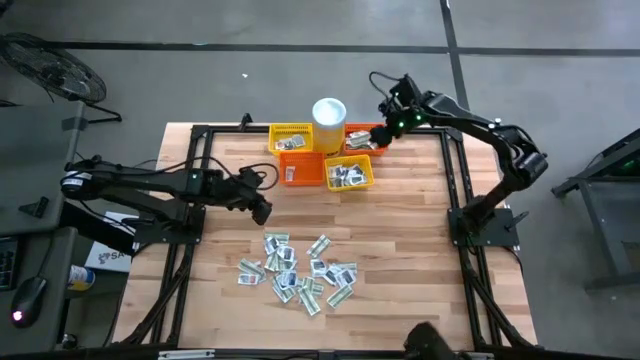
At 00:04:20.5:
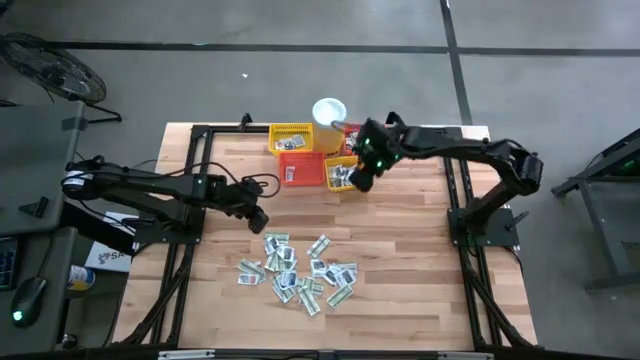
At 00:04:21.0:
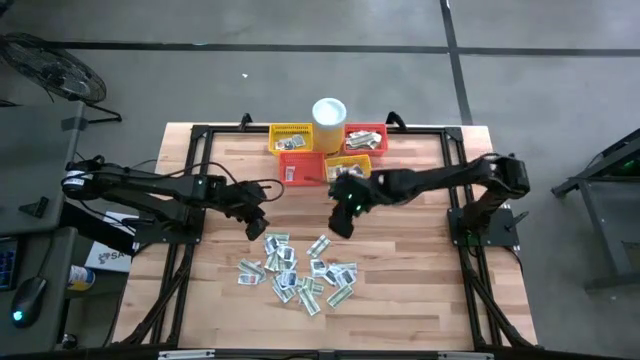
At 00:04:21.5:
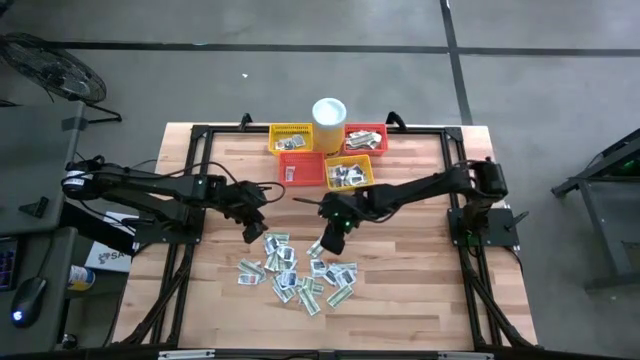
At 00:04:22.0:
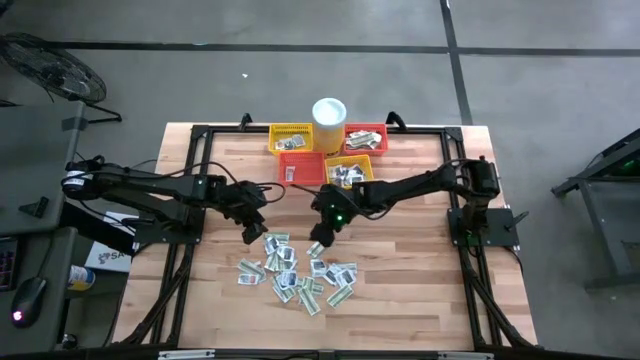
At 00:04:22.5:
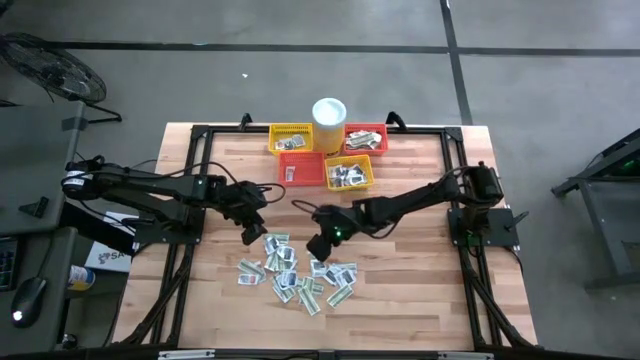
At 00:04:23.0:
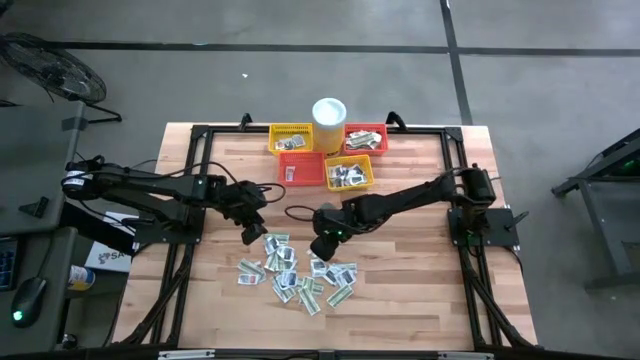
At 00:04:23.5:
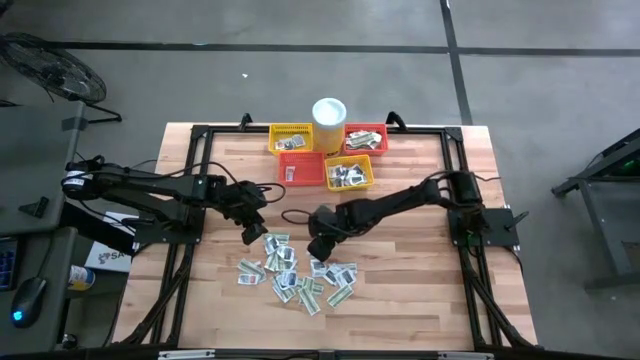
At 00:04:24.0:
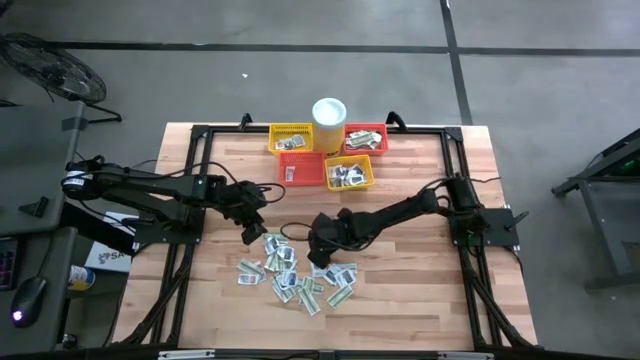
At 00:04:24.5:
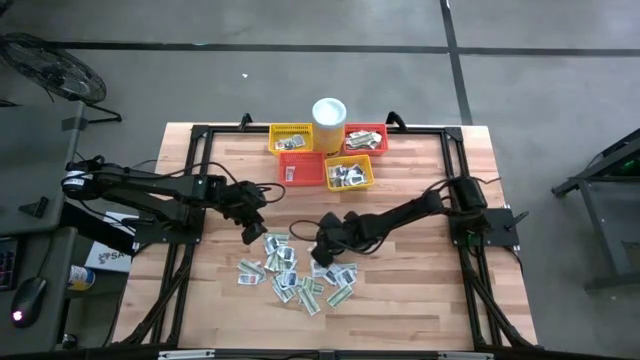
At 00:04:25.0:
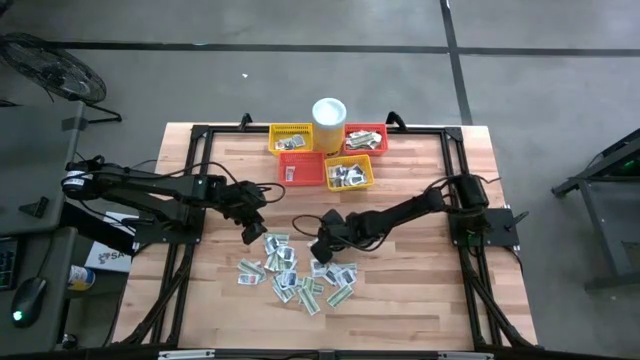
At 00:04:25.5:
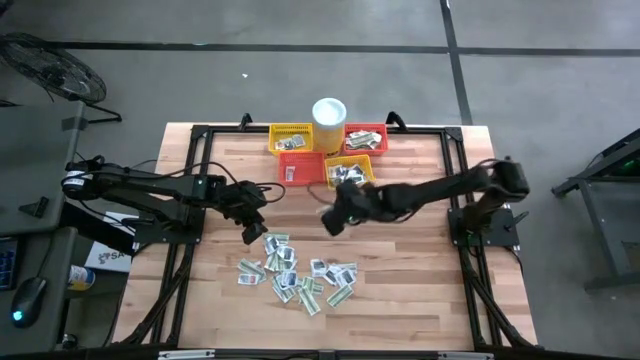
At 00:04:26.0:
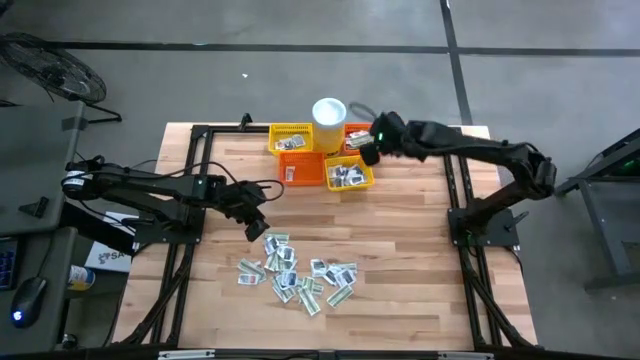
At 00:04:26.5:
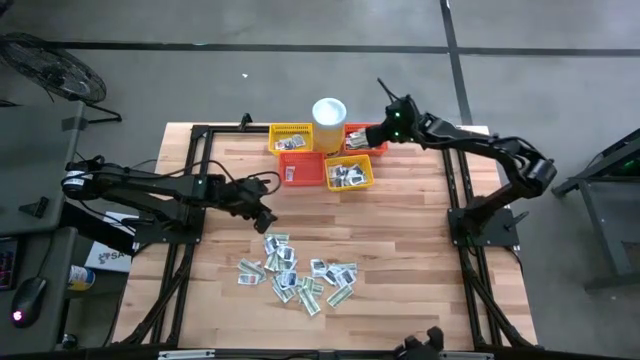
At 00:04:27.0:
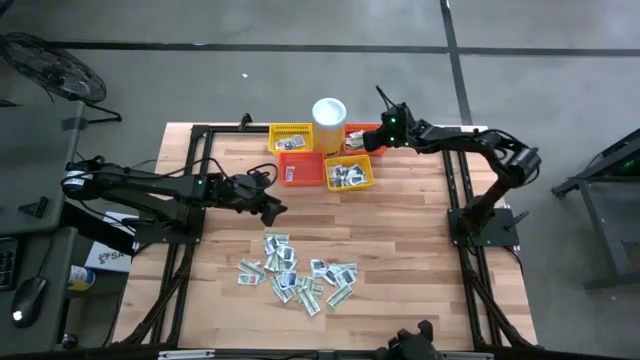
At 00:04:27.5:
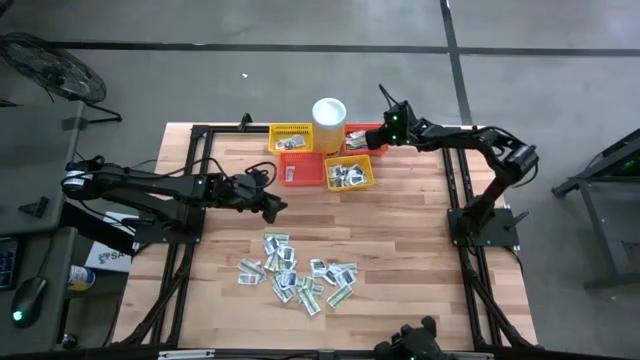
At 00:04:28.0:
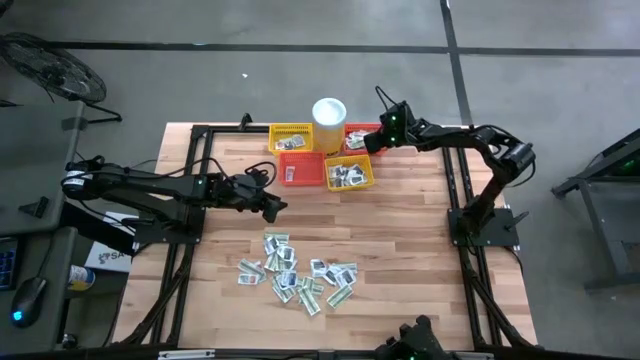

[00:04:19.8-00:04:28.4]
Task: Pick & Place First Aid Supplies
Put the green bandage pack into the top orange basket

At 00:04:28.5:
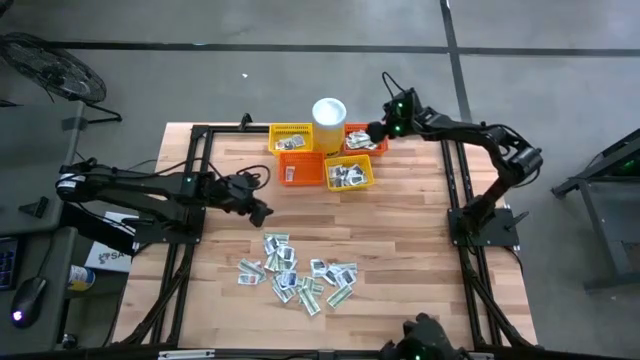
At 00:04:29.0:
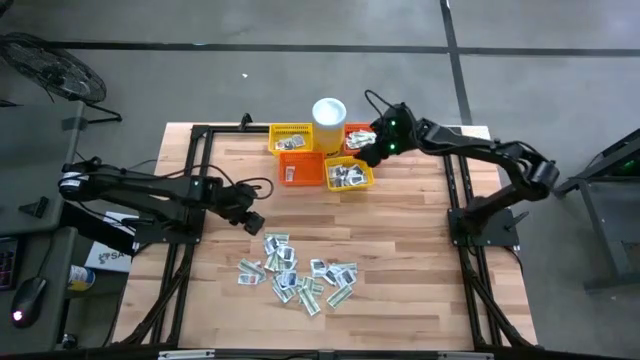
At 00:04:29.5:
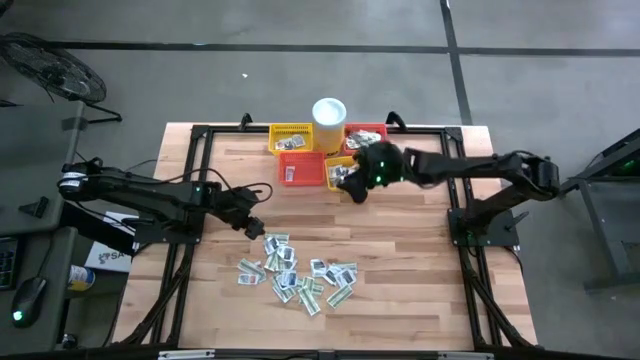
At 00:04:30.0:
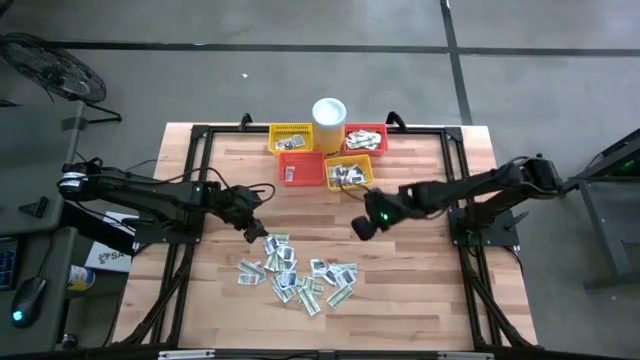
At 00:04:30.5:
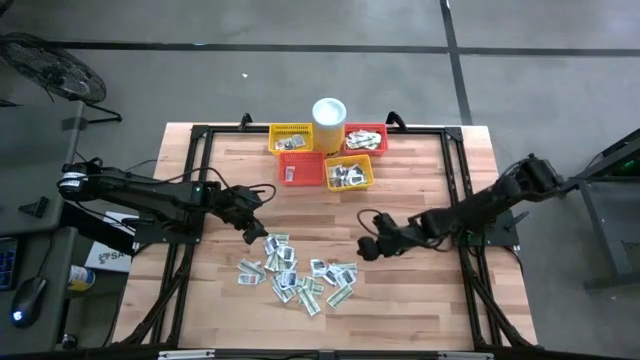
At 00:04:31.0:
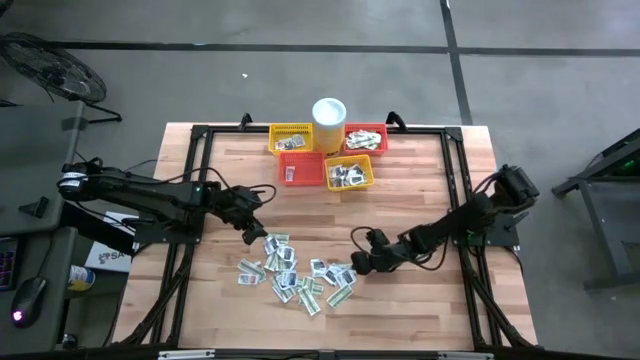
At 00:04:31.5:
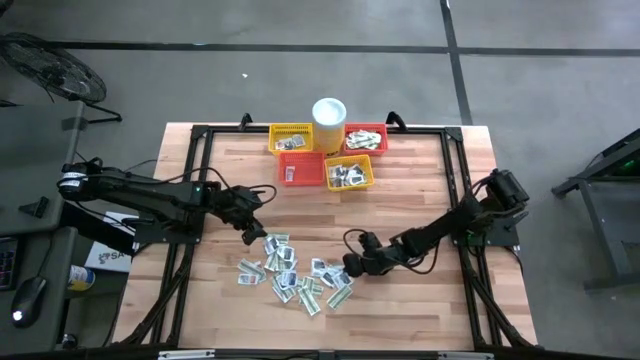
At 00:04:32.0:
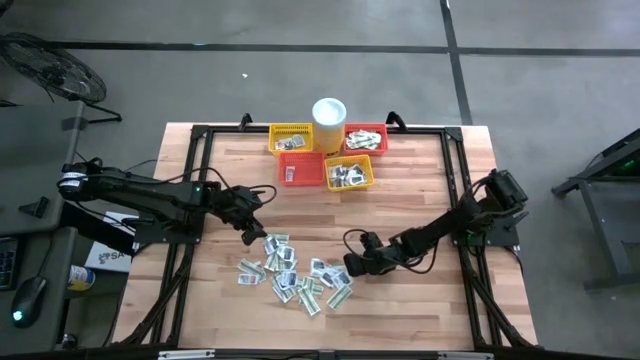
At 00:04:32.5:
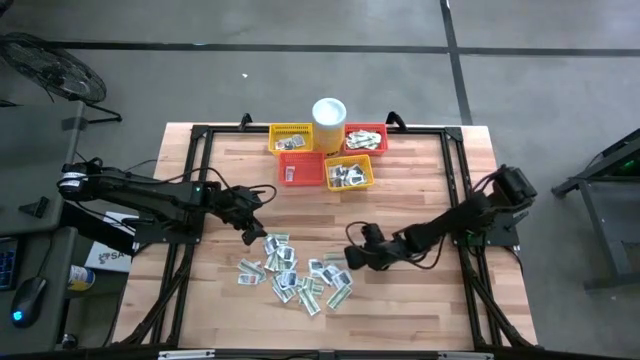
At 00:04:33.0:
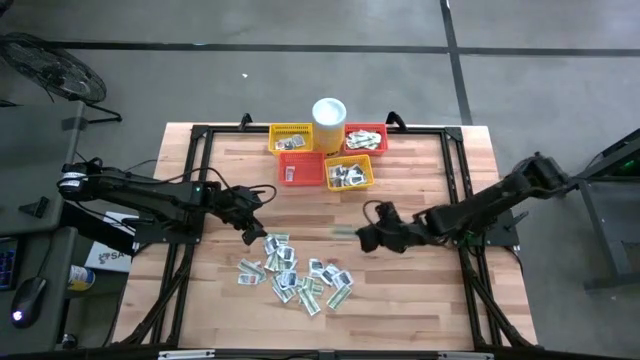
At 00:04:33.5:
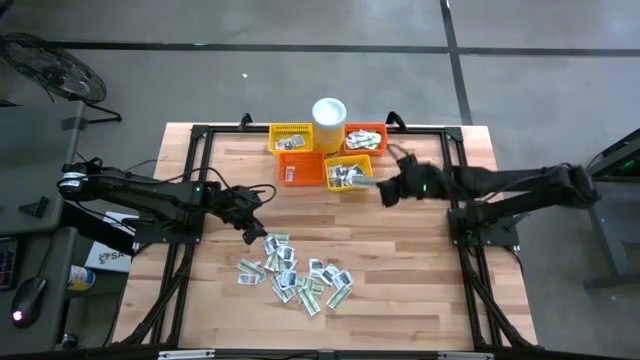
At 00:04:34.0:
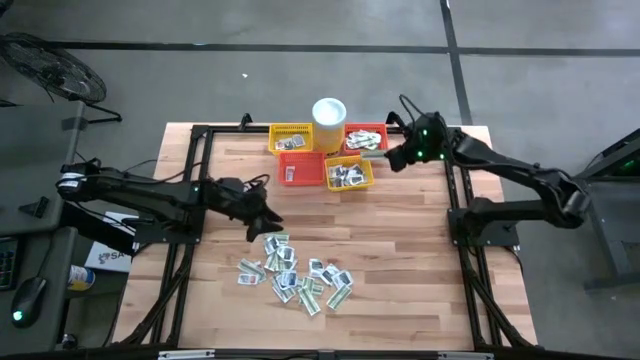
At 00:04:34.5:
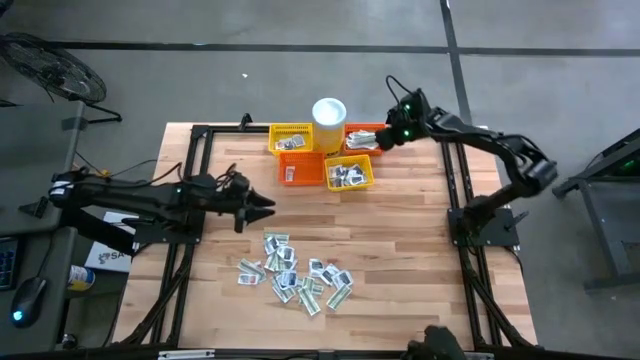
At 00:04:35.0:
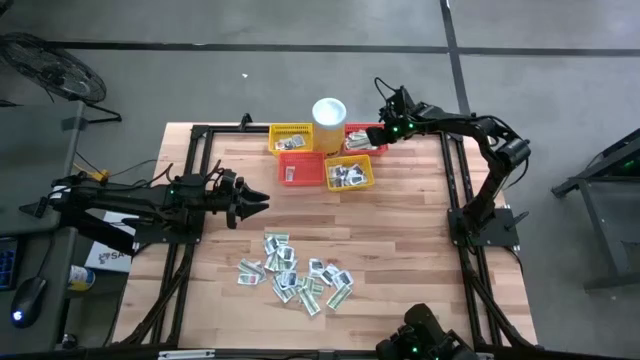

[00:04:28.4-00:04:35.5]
Put the green bandage pack into the top orange basket

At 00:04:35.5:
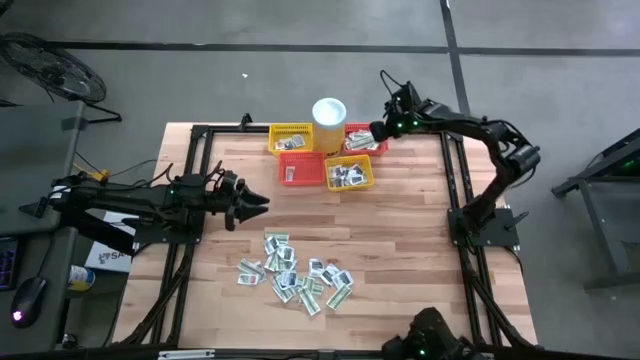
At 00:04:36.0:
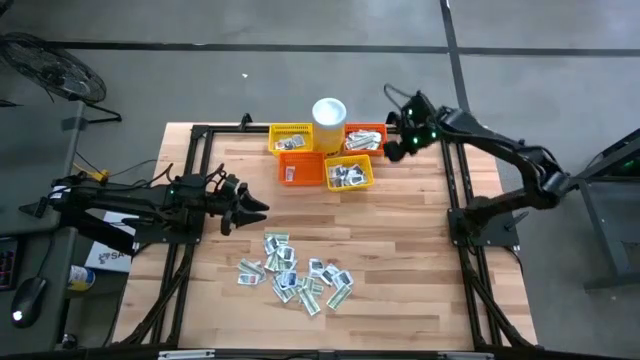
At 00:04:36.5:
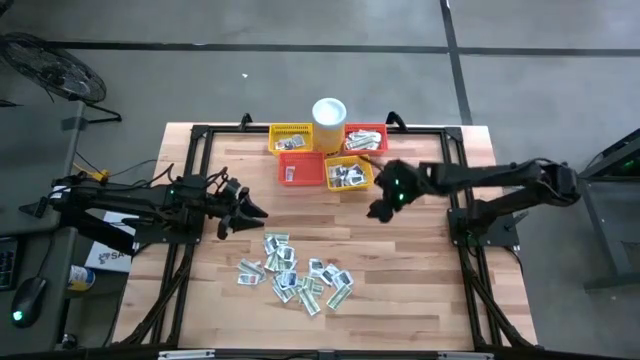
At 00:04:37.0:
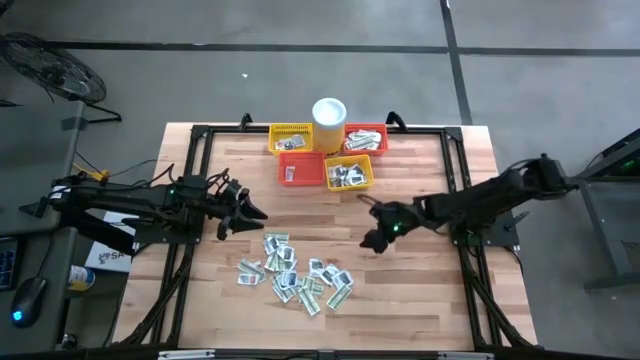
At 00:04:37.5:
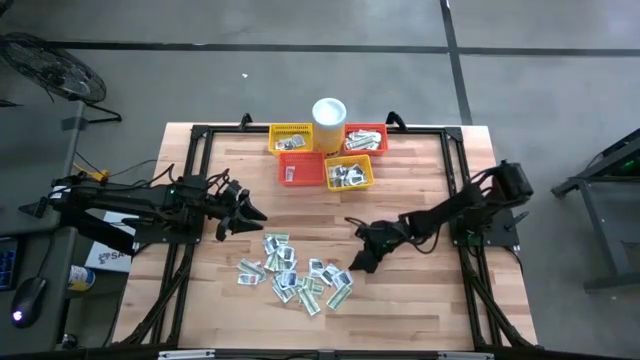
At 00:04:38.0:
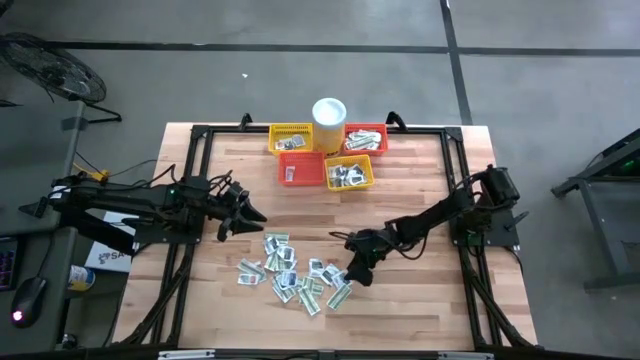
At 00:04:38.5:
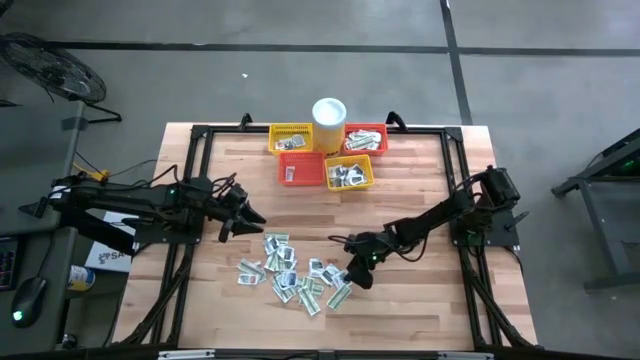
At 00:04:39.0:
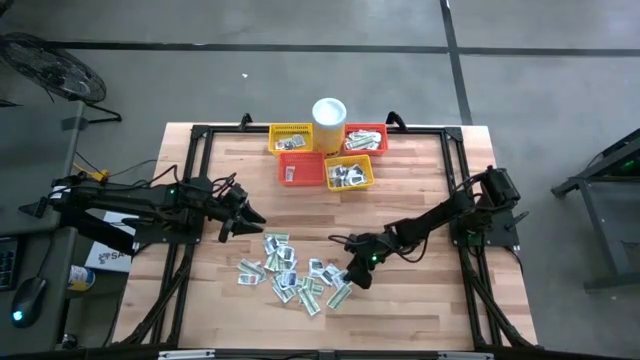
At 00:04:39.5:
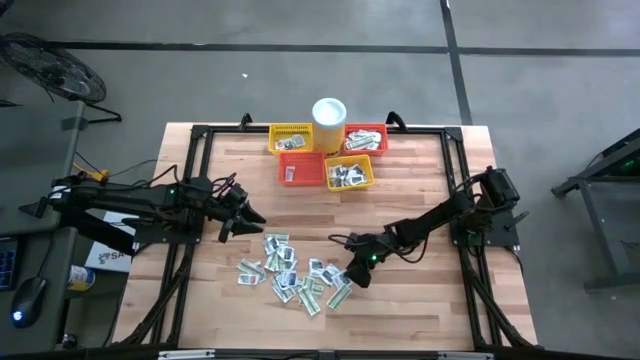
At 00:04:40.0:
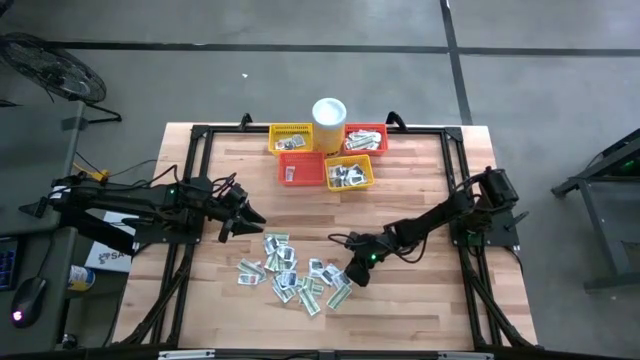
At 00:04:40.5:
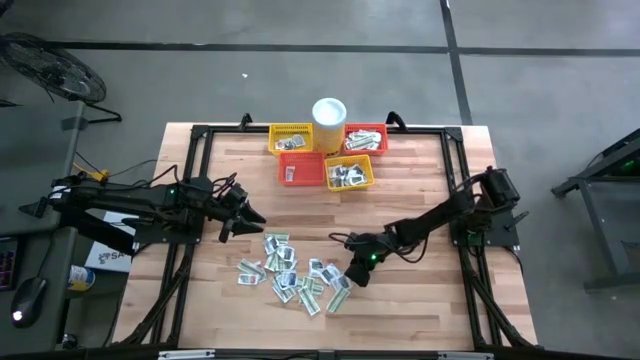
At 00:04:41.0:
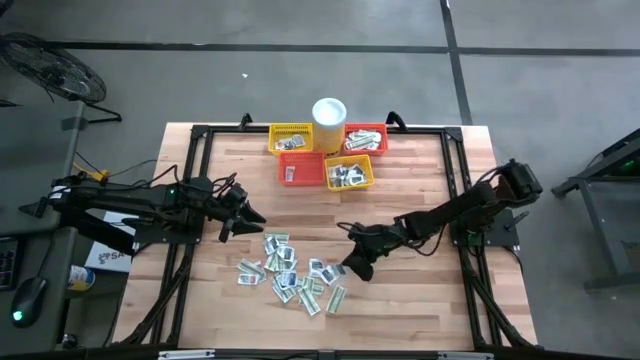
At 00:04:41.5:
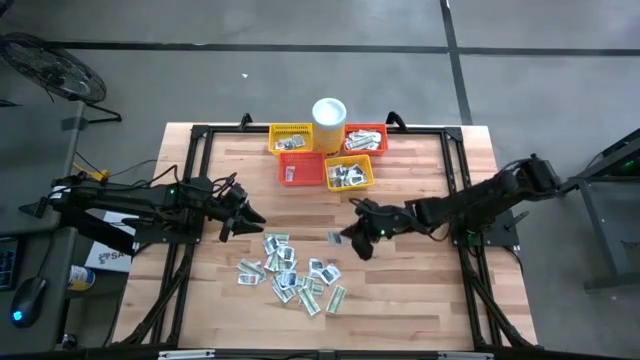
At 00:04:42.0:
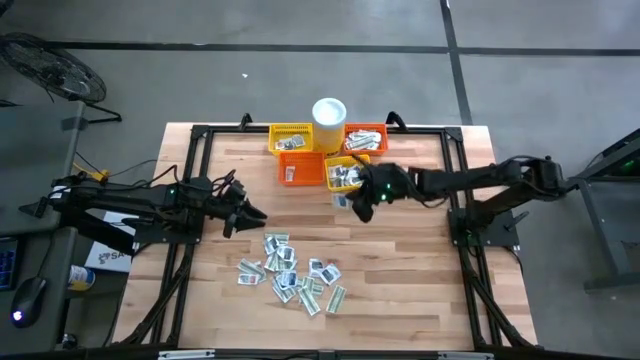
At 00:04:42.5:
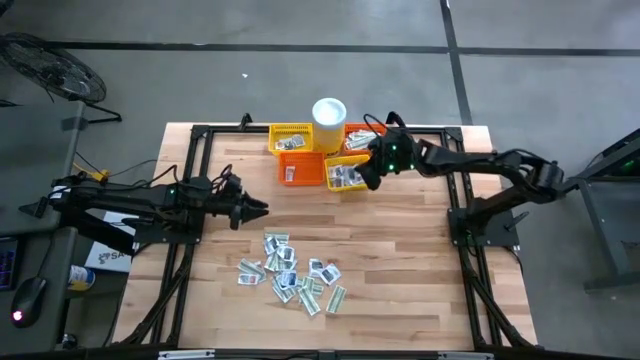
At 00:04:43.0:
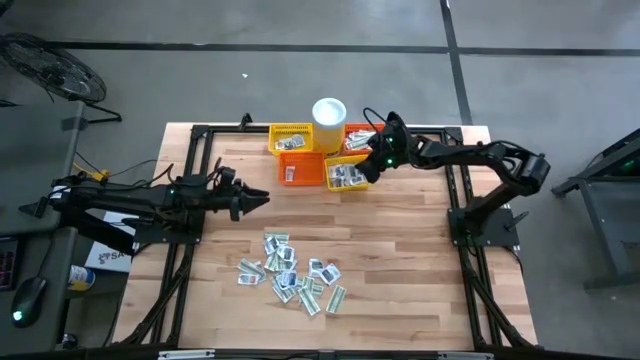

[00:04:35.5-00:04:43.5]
Put the black towelette pack into the bottom yellow basket
